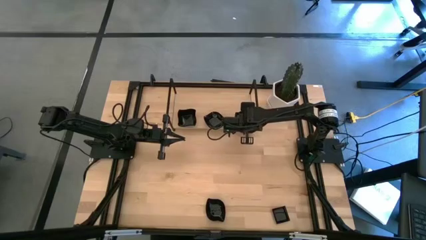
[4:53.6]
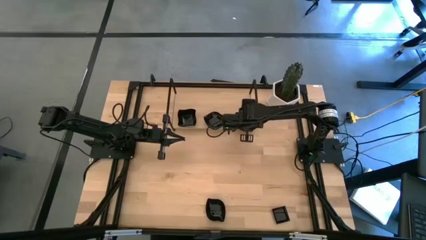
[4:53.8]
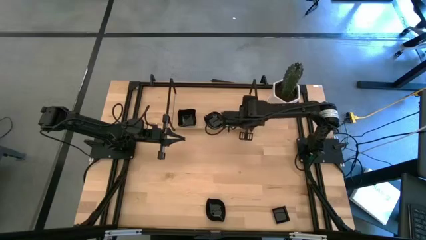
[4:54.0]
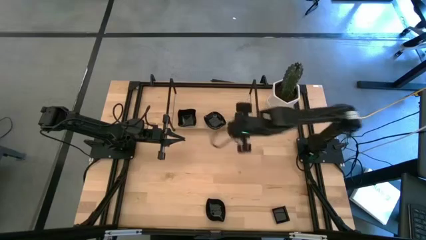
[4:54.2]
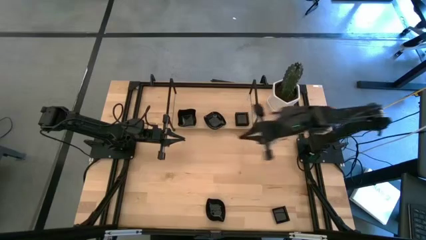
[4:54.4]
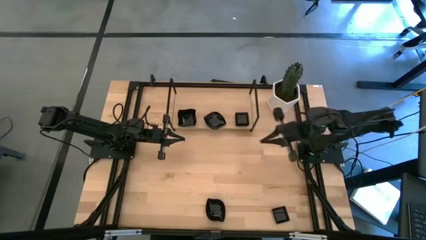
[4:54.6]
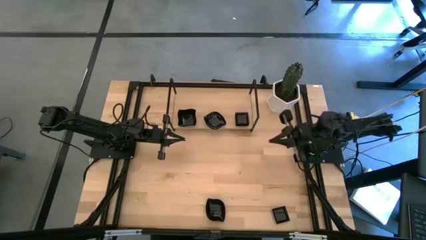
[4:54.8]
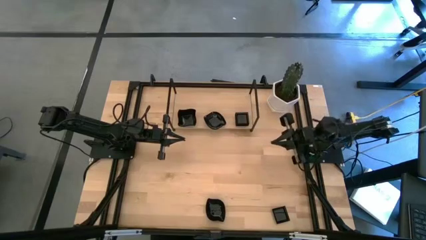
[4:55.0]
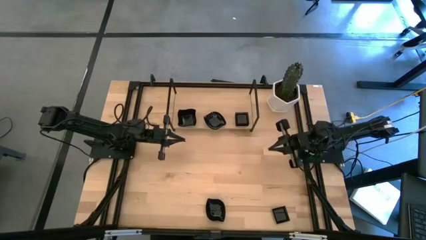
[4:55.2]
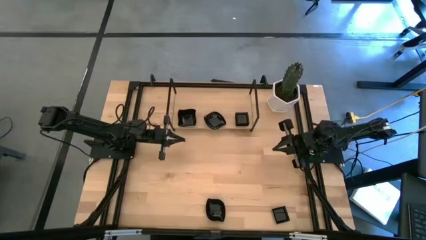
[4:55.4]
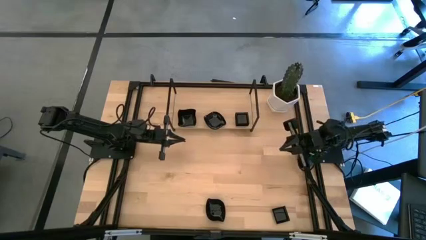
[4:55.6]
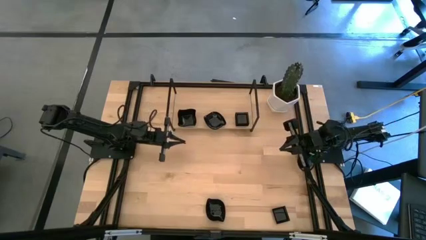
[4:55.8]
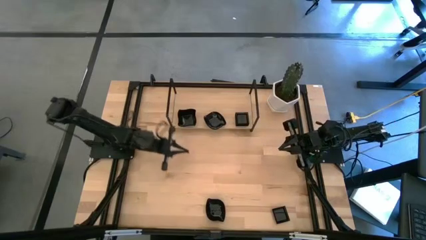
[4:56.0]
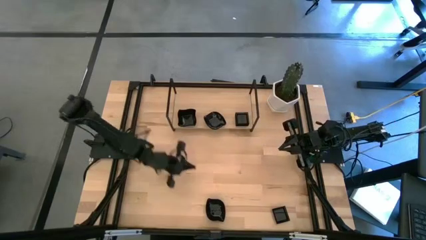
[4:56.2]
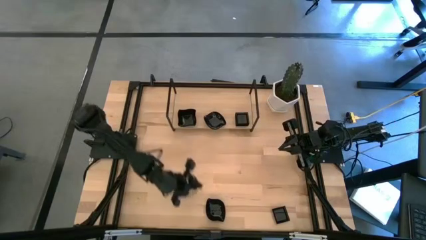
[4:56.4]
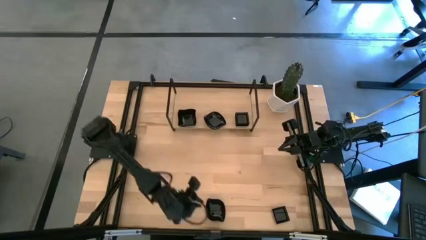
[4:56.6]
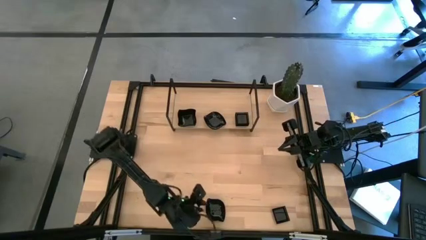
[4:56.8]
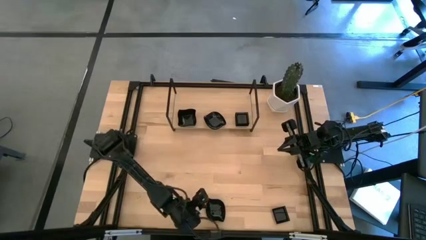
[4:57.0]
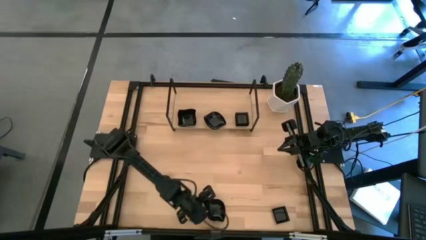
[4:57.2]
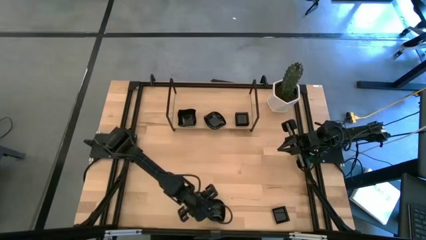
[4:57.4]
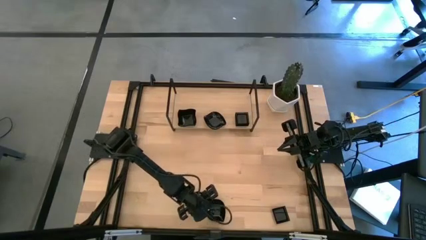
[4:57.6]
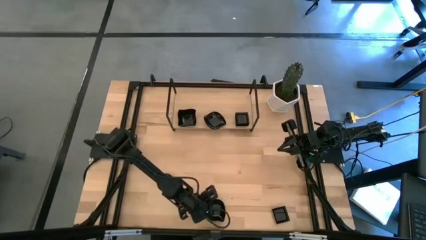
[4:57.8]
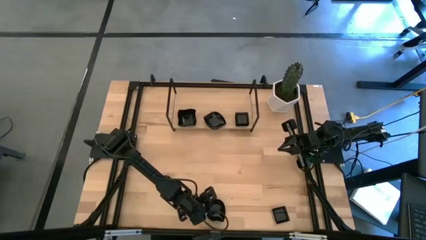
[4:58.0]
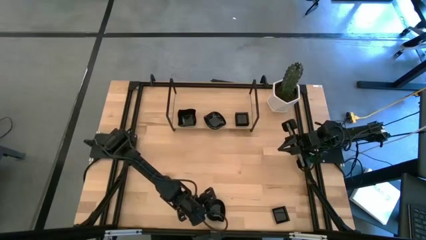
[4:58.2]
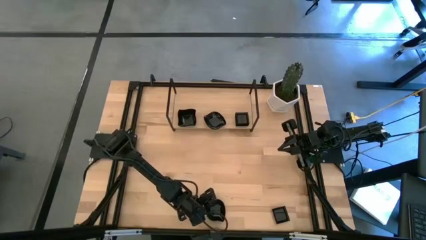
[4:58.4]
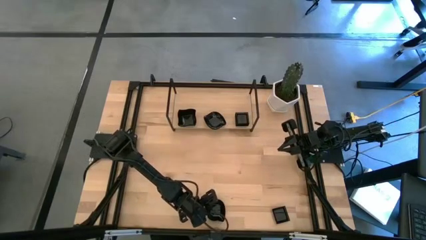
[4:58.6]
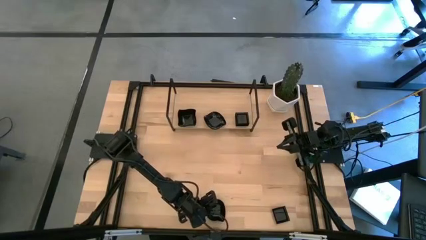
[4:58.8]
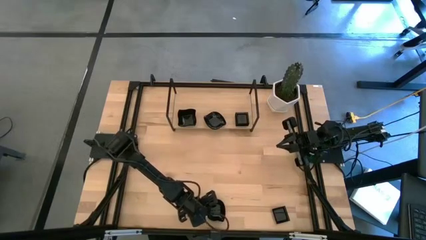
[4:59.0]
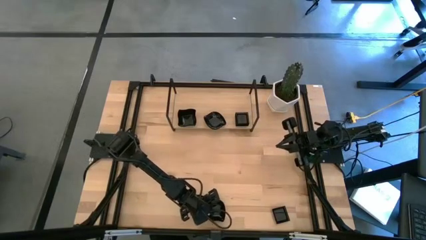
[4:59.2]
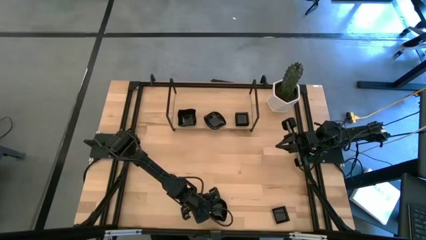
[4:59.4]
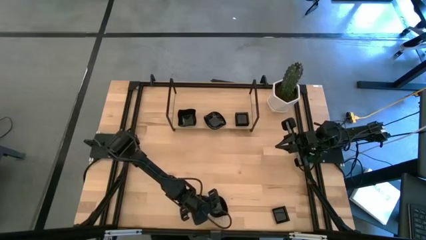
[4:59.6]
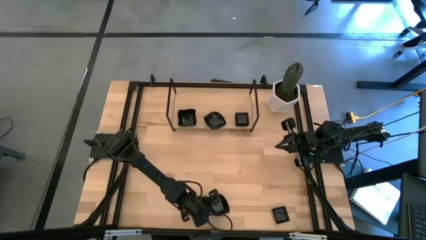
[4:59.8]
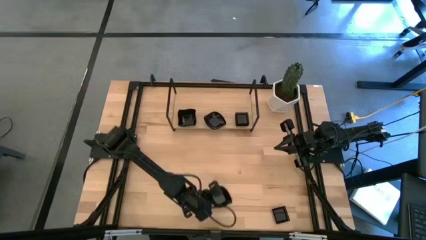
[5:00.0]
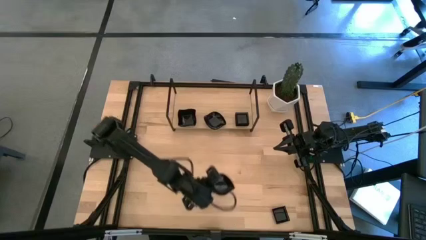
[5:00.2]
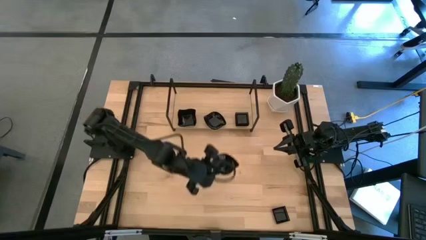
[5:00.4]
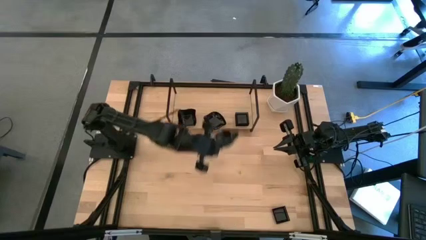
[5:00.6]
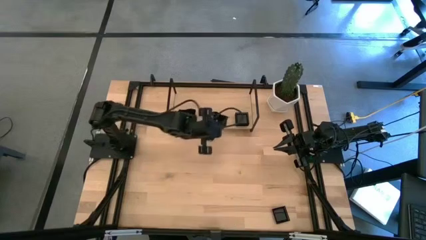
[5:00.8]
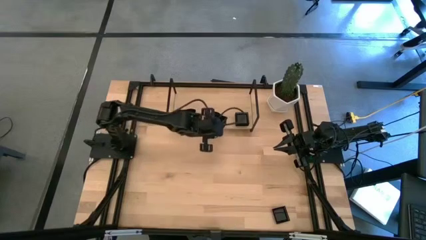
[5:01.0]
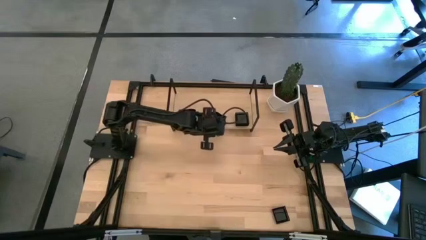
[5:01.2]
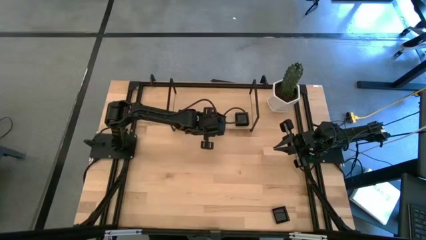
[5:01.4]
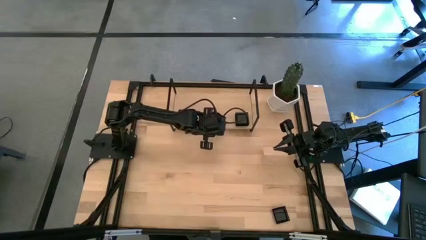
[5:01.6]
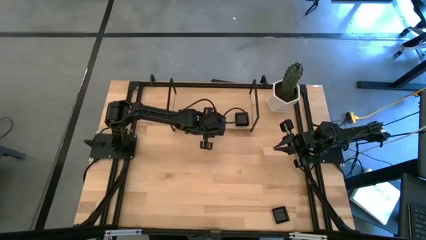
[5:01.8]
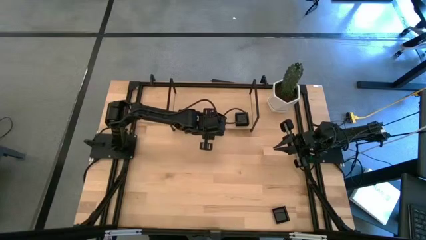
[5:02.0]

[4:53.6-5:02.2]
Task: Pick & Place Mini shaped plates
Stack the black leaf-shaped plate on top of the black leaf-shaped plate on the shelf

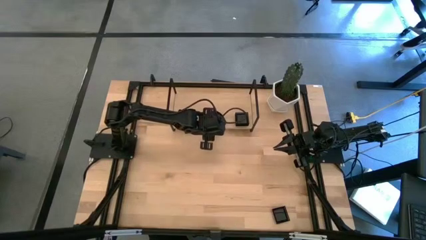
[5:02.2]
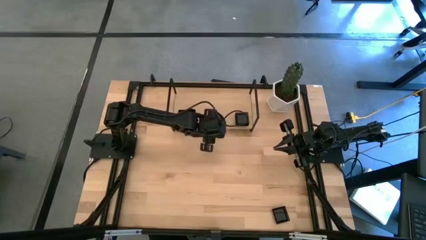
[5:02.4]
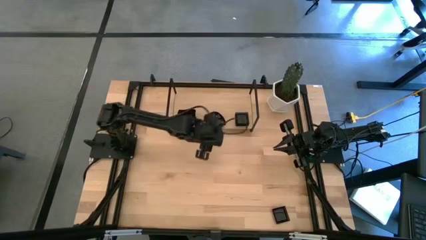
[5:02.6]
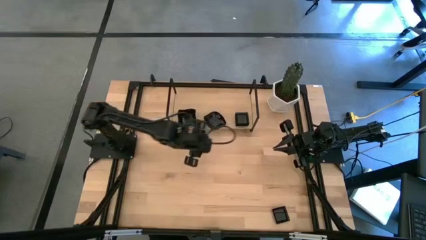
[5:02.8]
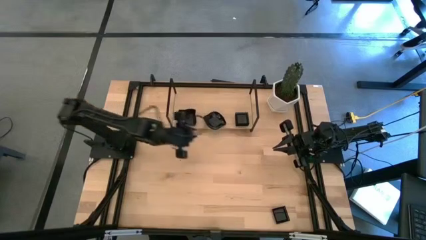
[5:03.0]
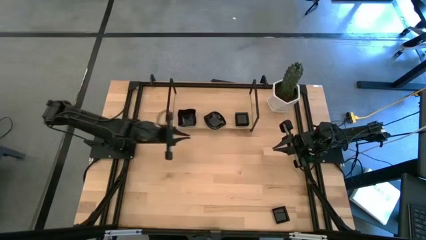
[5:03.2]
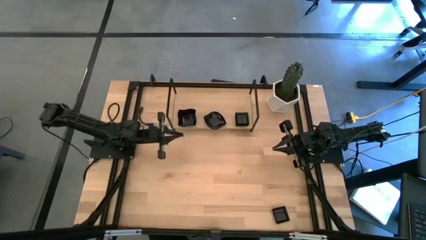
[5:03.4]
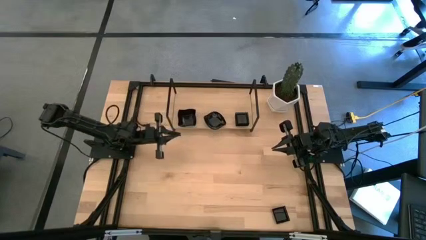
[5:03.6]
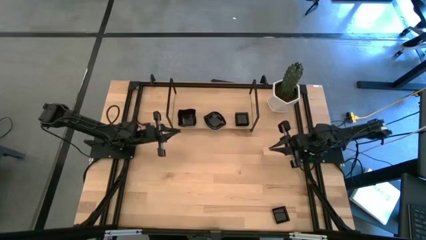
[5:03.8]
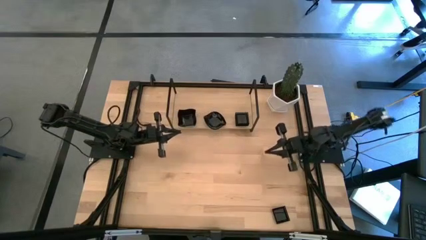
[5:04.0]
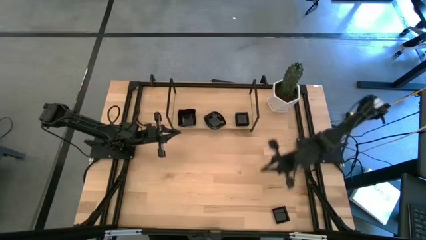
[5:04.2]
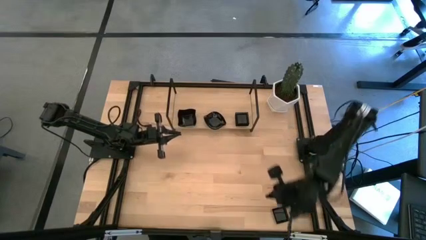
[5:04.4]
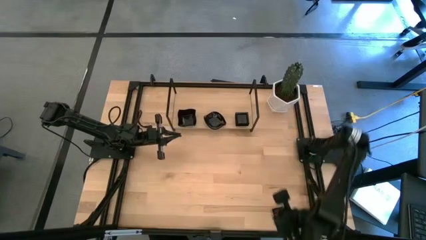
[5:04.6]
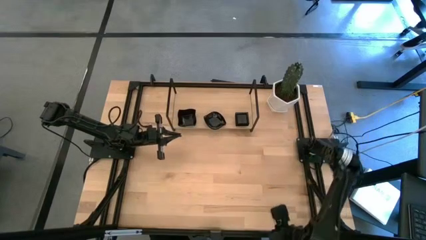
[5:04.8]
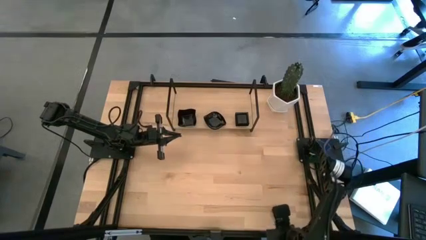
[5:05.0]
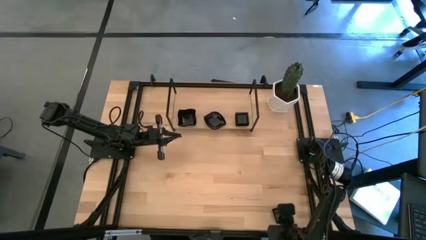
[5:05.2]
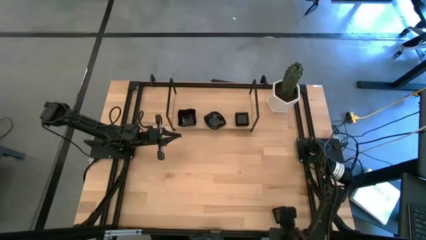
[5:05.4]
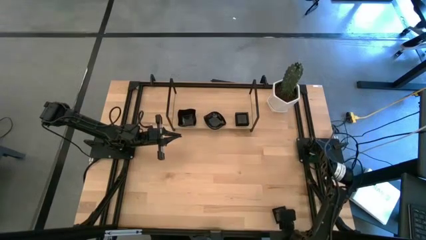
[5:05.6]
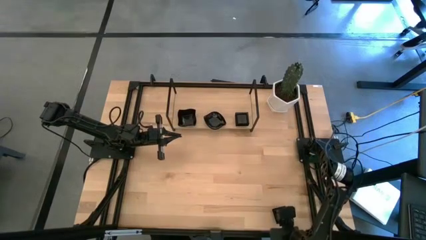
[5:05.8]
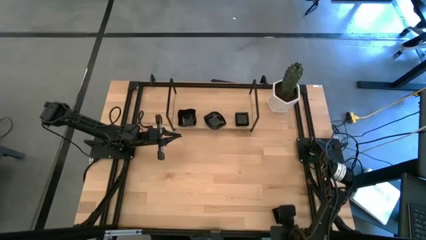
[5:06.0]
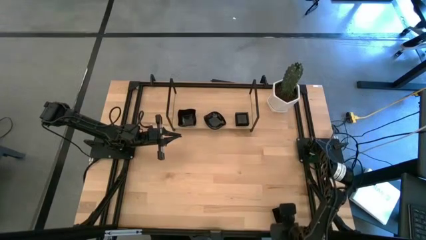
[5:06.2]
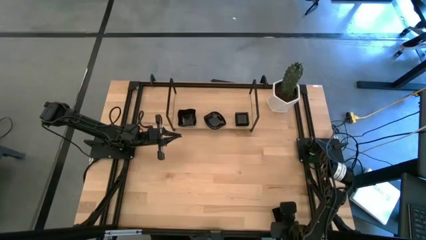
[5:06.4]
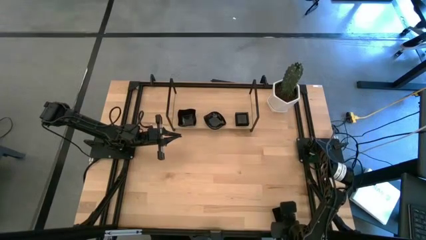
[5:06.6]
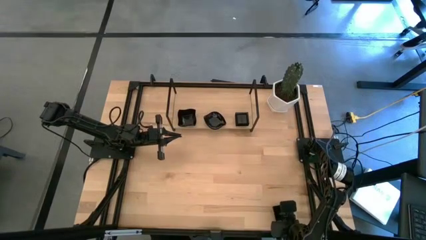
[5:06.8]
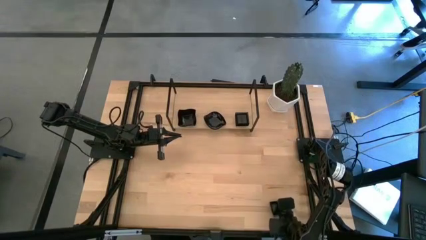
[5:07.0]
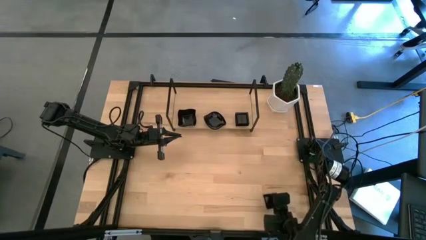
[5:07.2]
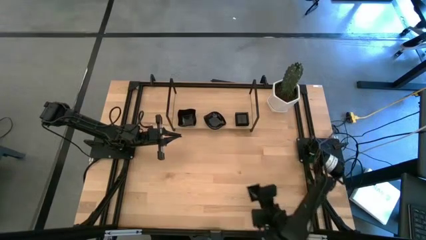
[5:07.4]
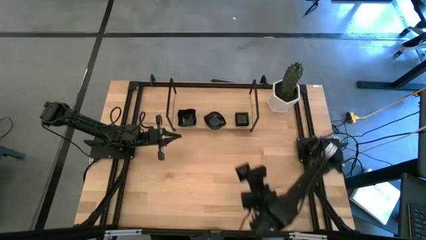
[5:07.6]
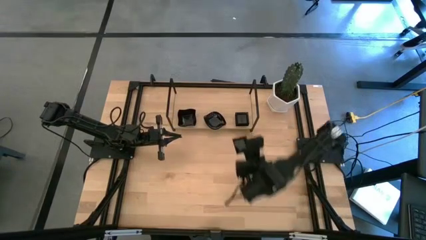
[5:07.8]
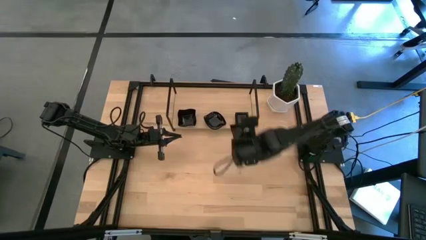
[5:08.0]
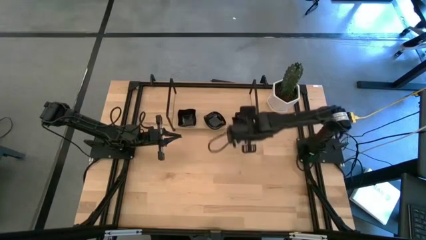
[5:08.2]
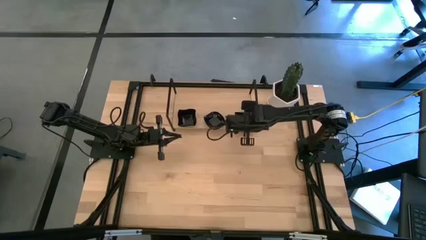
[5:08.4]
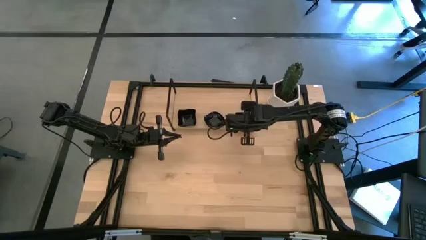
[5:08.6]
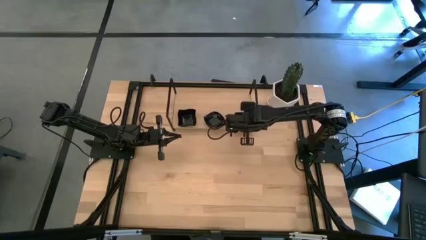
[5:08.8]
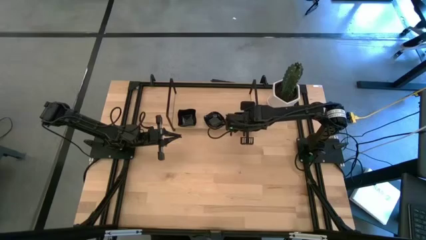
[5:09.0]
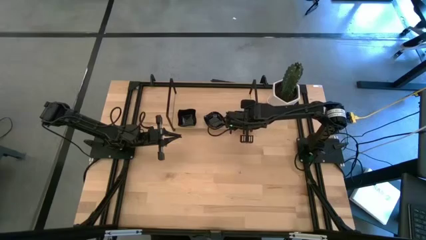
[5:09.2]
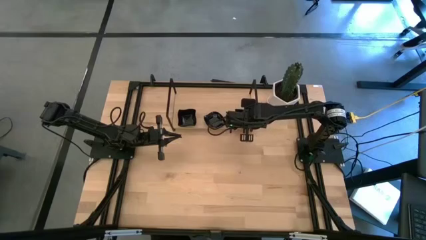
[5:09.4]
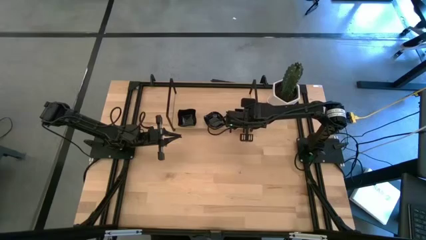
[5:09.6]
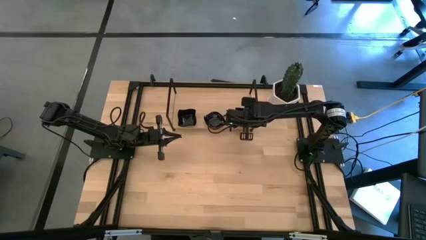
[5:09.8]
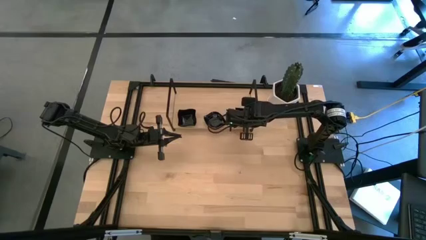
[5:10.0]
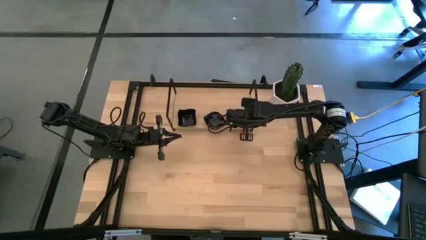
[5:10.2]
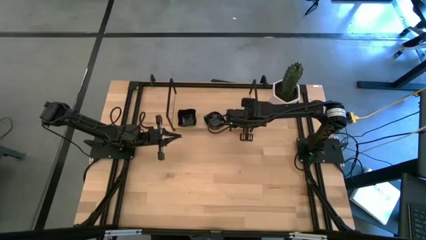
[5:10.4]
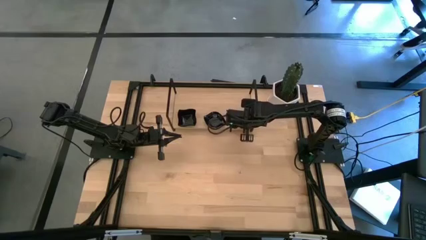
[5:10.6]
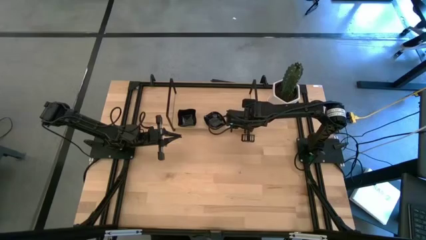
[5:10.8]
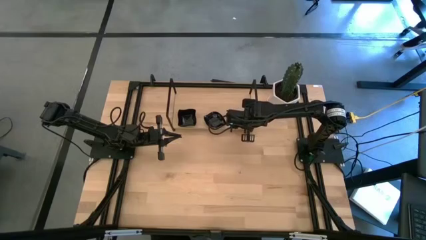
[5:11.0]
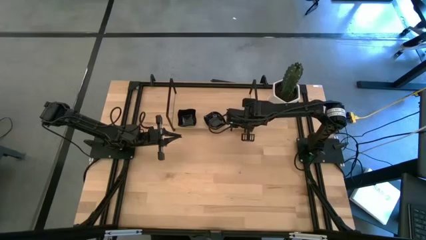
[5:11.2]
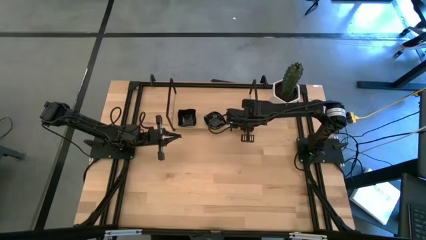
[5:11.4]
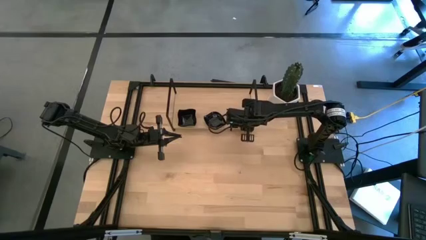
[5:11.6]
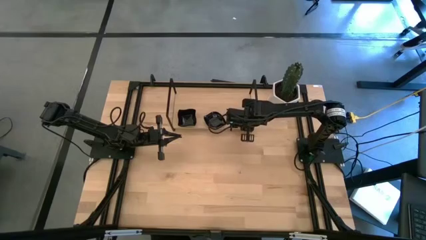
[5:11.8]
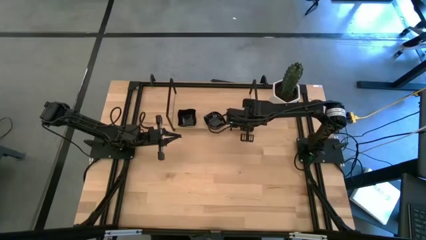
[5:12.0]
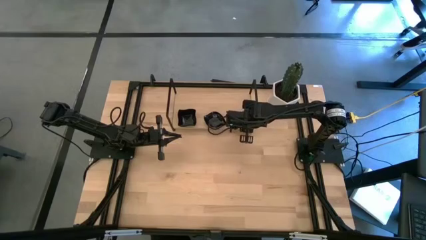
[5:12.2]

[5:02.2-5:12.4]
Stack the black square plate on top of the black square plate on the shelf
